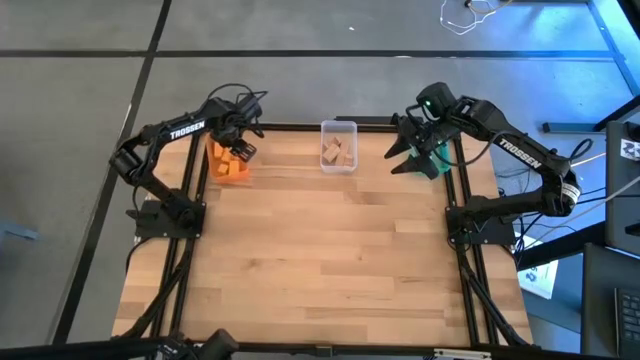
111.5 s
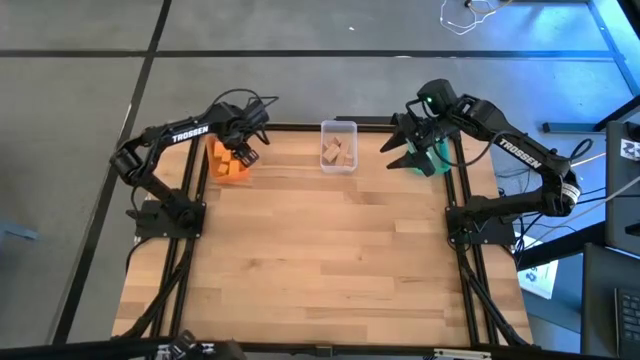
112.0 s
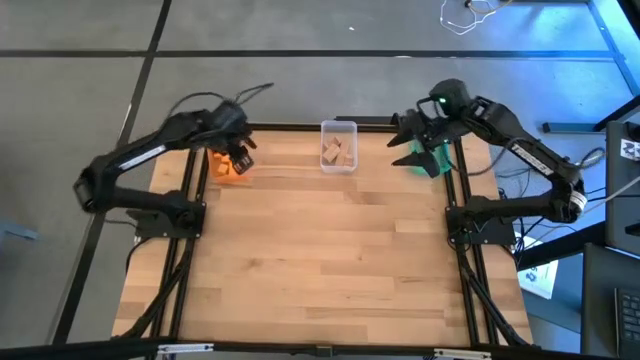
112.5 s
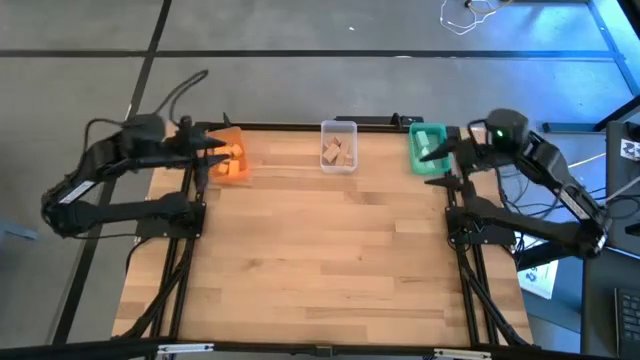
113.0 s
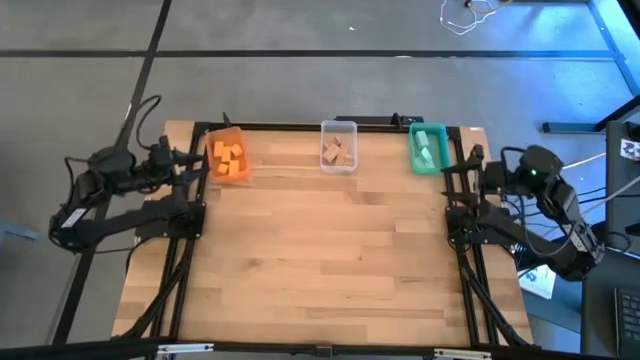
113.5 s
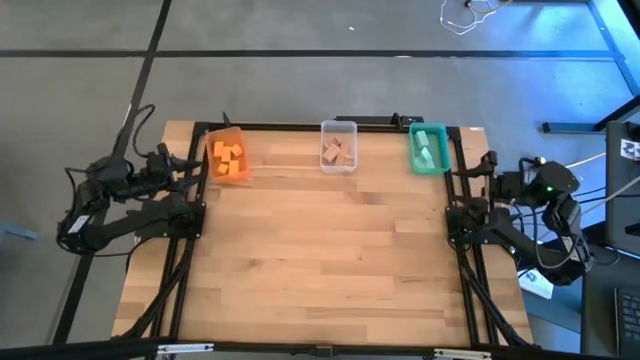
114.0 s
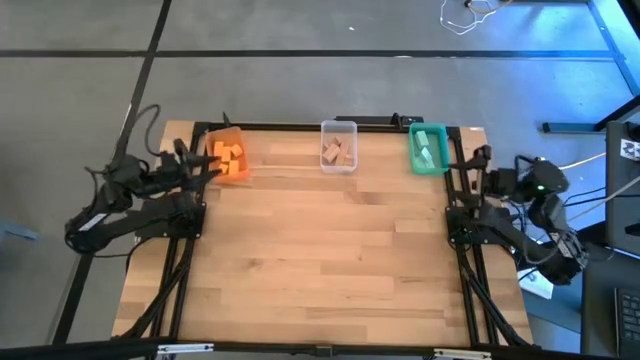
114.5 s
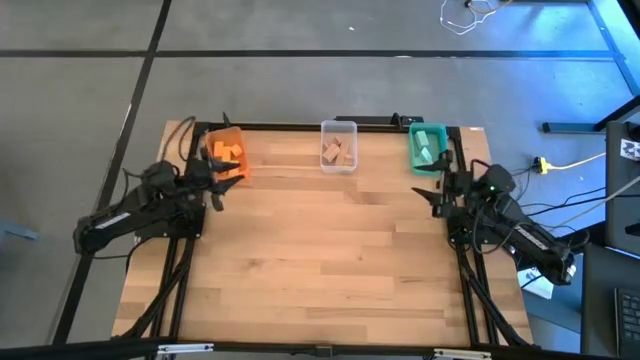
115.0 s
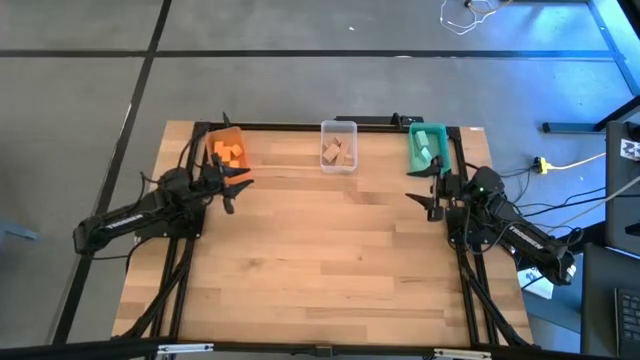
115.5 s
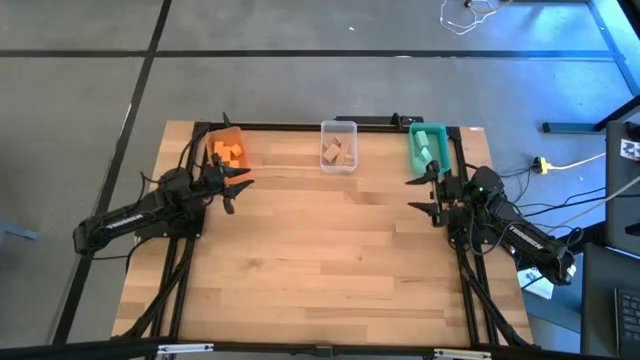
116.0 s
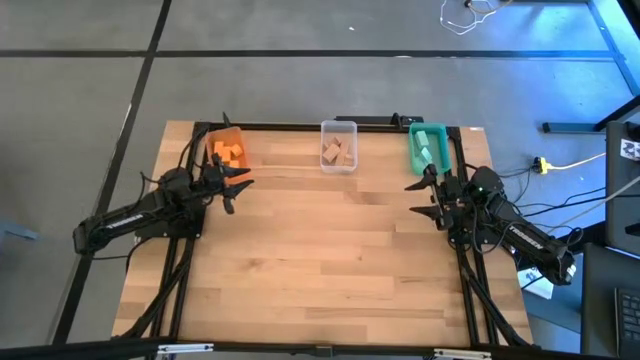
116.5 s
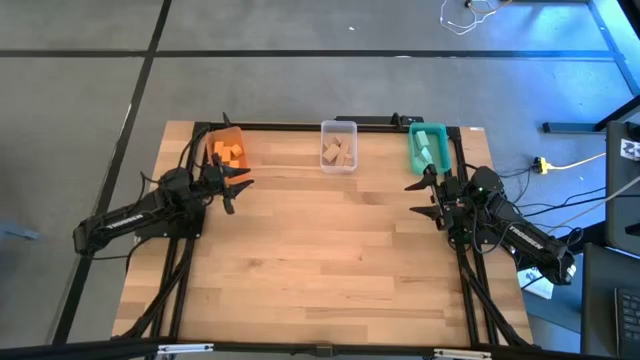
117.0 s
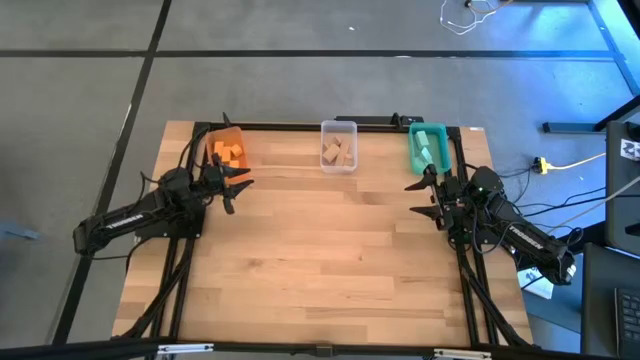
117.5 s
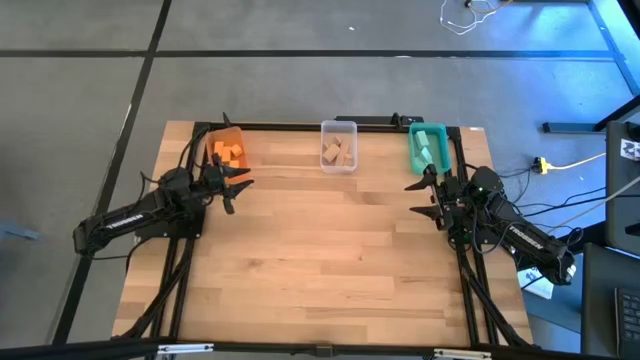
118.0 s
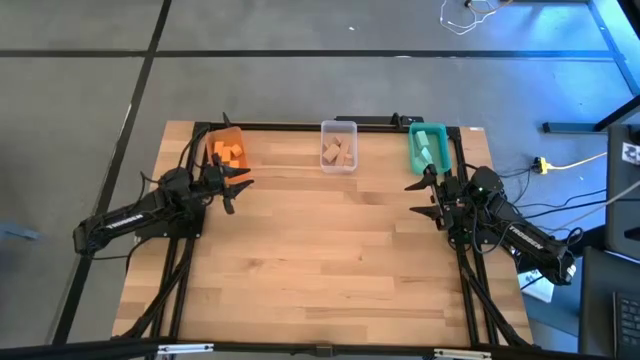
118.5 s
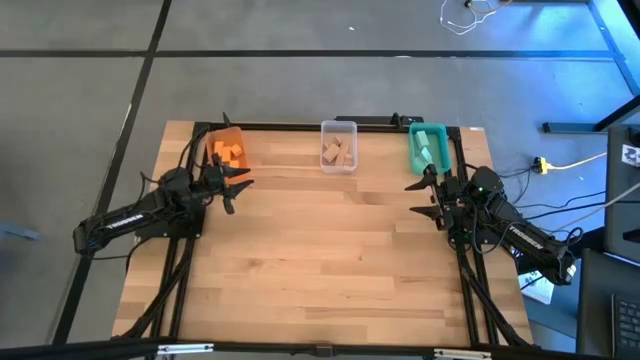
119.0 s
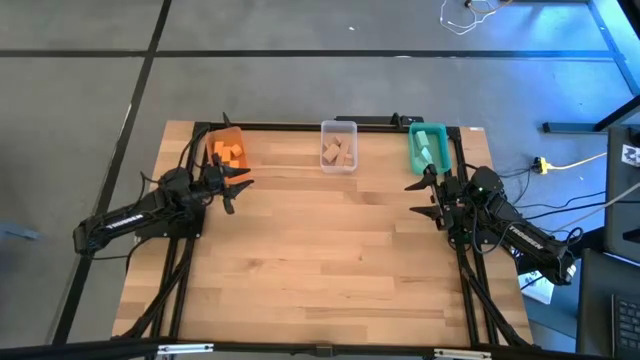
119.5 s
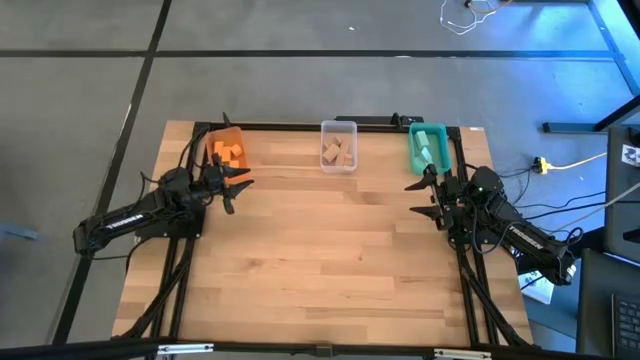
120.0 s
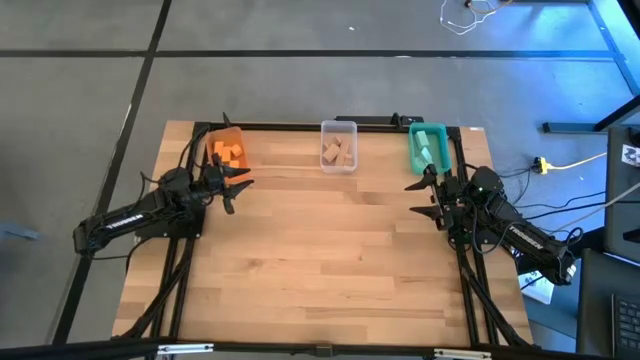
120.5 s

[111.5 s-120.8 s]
Task: Sort & place blocks by color
Return to Home Position

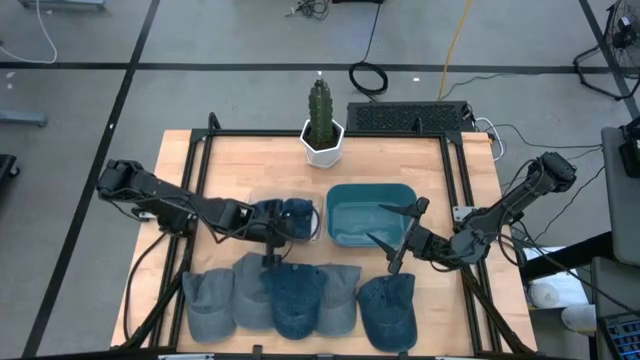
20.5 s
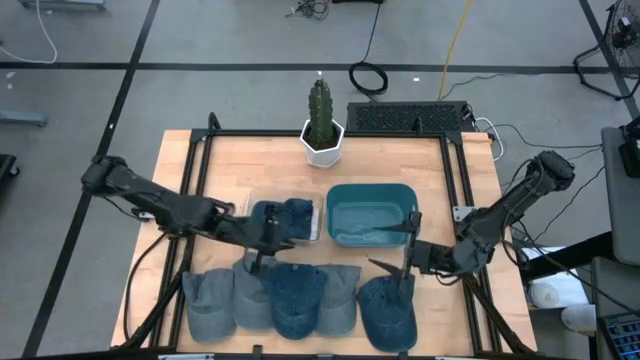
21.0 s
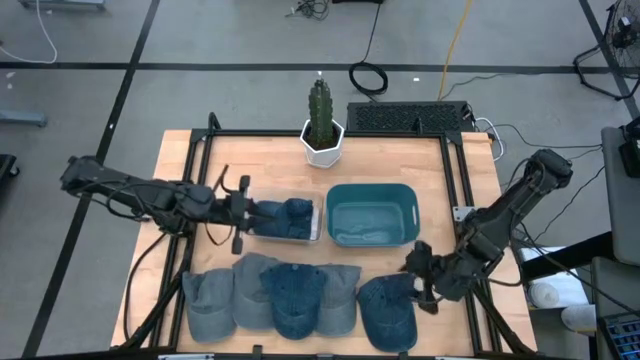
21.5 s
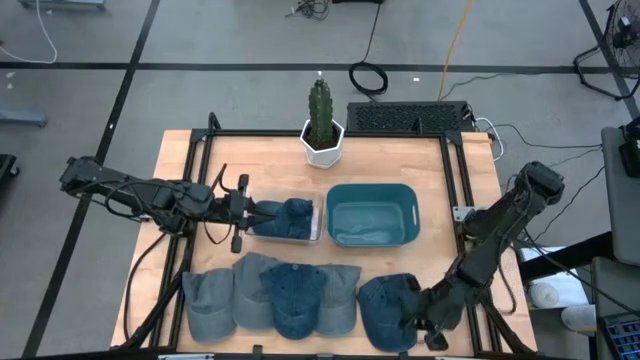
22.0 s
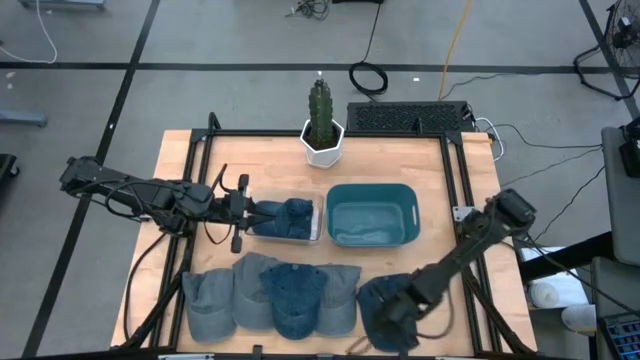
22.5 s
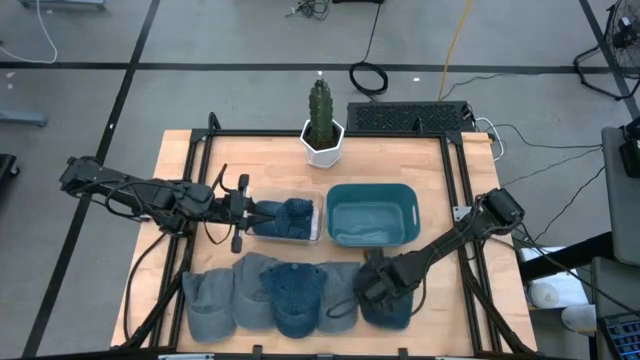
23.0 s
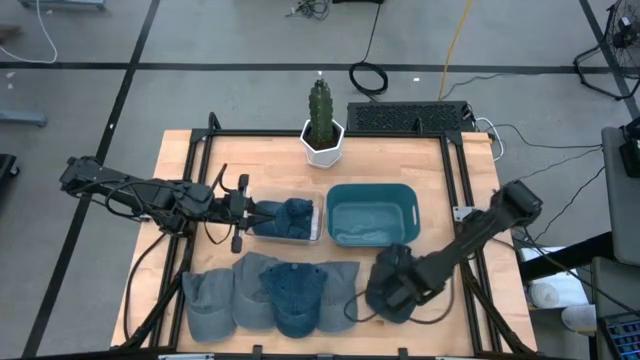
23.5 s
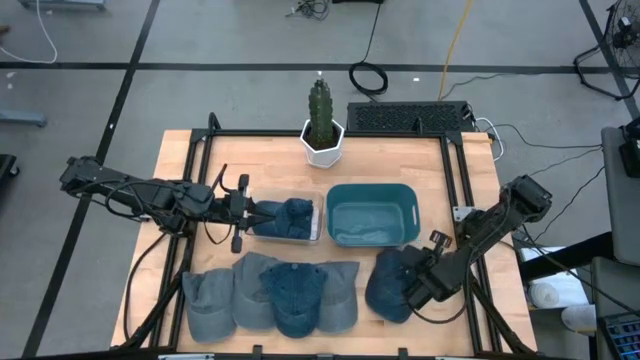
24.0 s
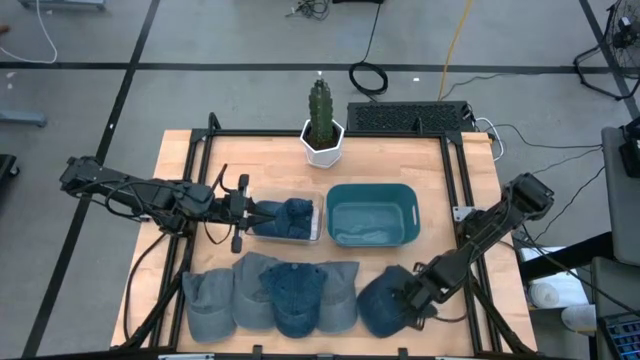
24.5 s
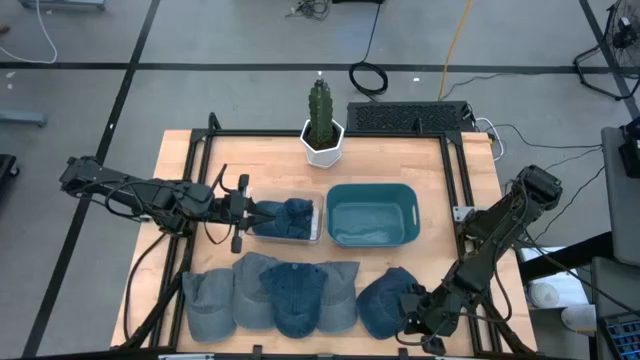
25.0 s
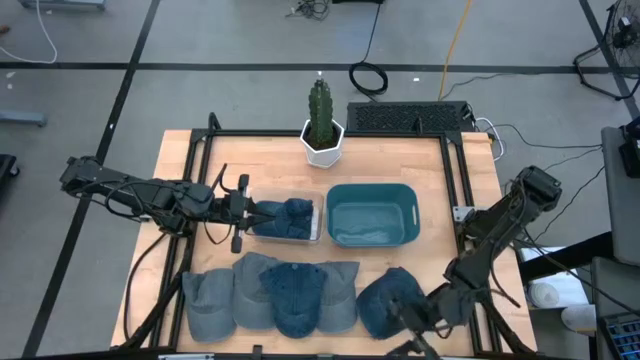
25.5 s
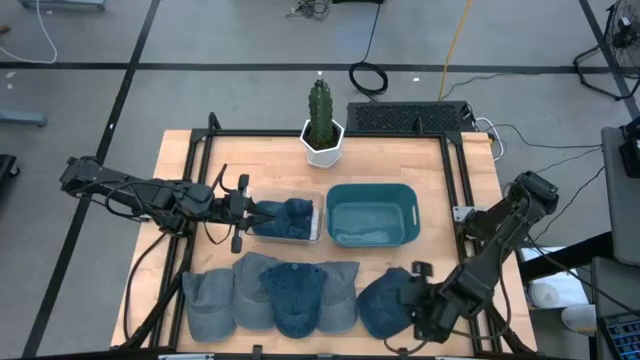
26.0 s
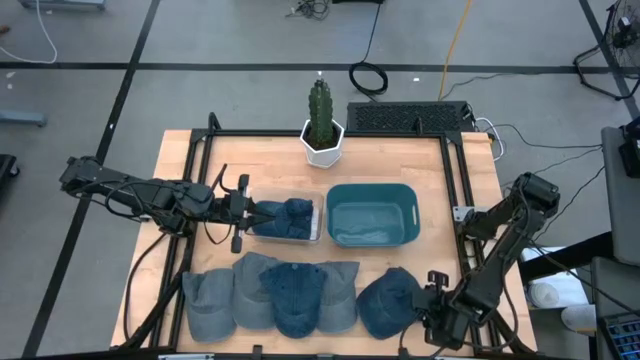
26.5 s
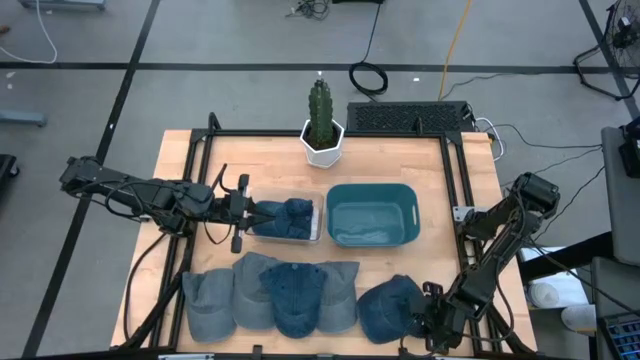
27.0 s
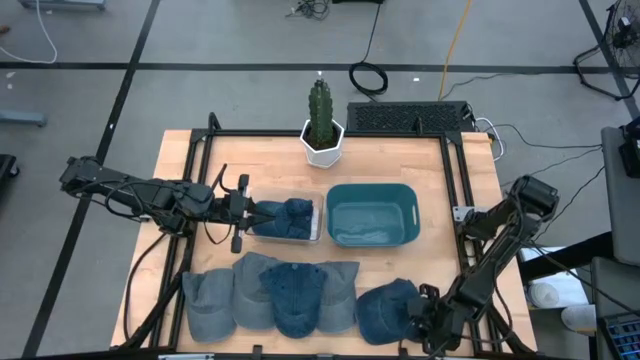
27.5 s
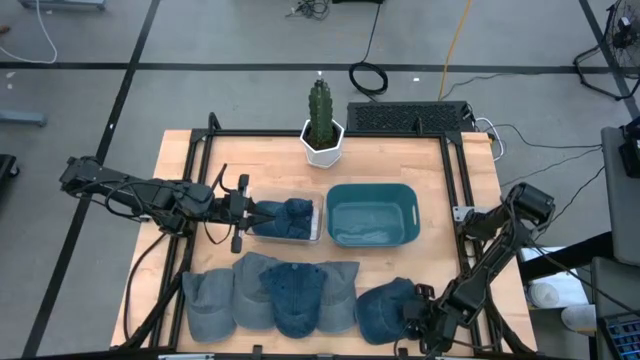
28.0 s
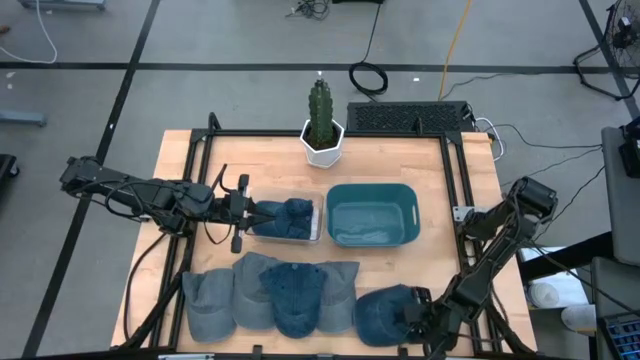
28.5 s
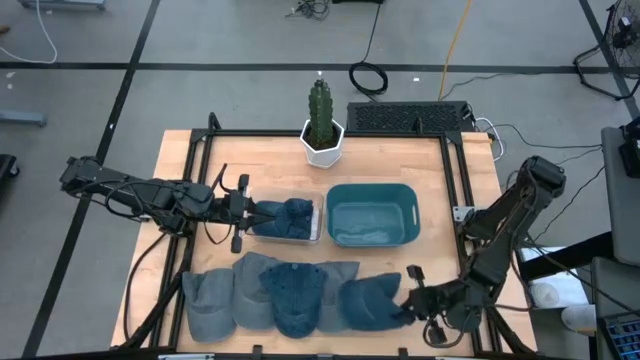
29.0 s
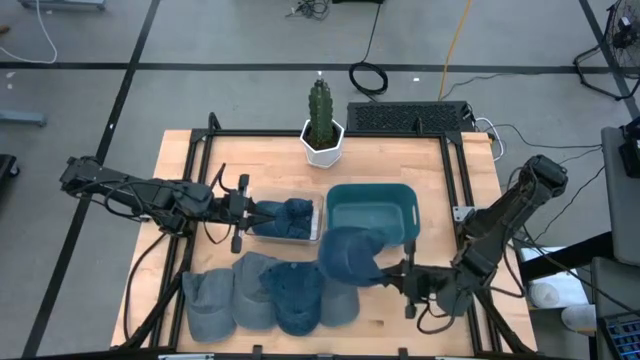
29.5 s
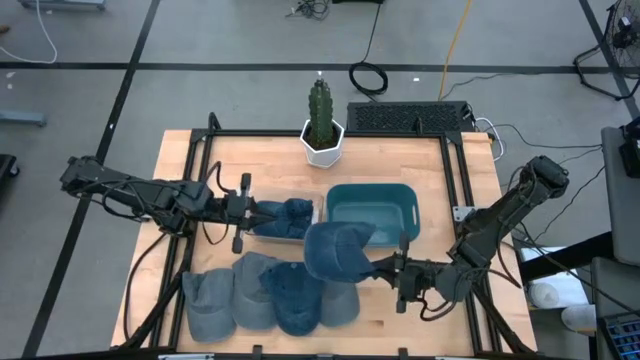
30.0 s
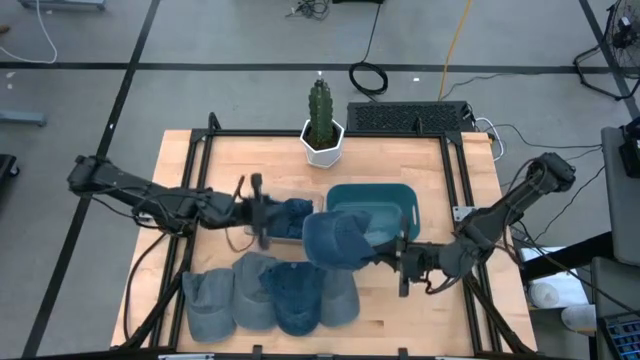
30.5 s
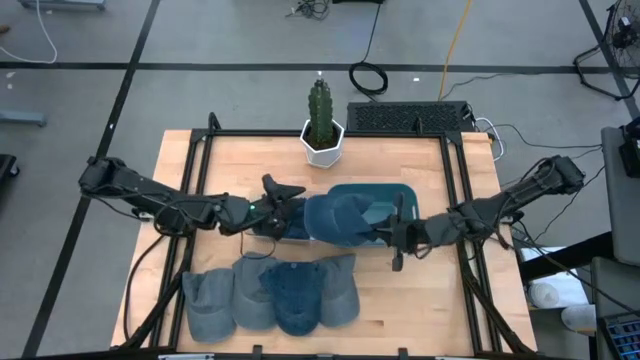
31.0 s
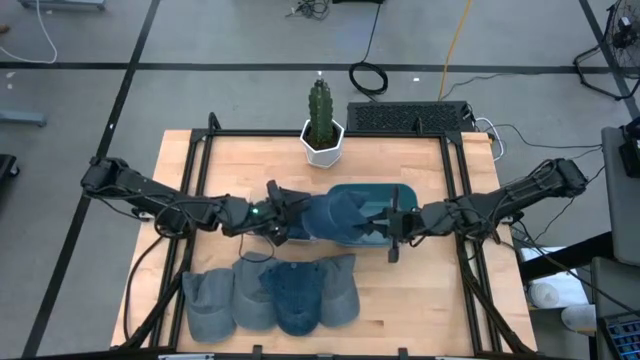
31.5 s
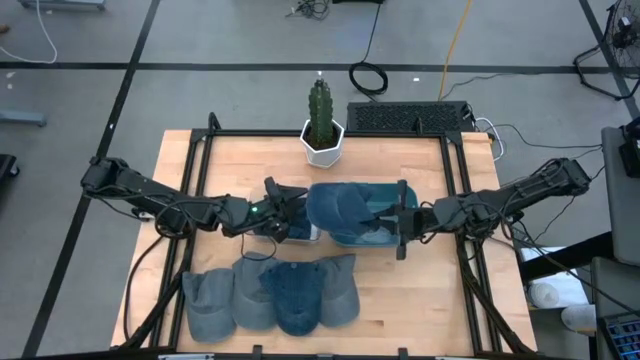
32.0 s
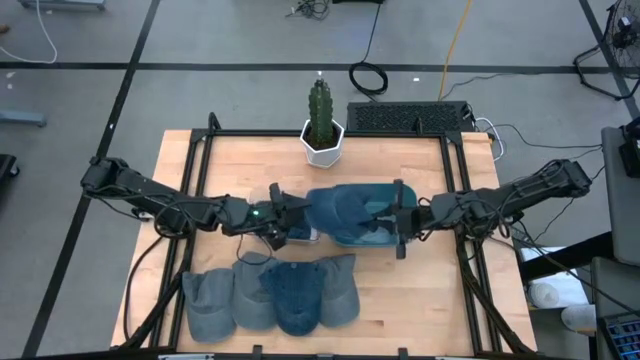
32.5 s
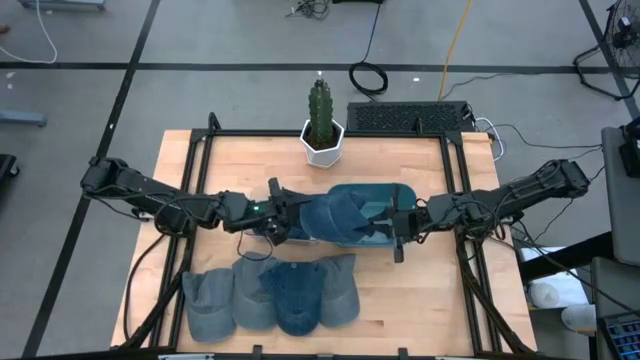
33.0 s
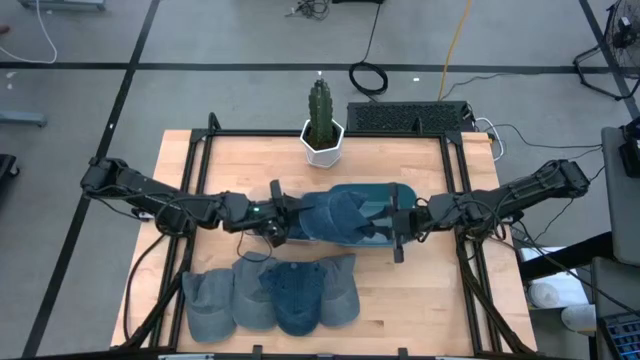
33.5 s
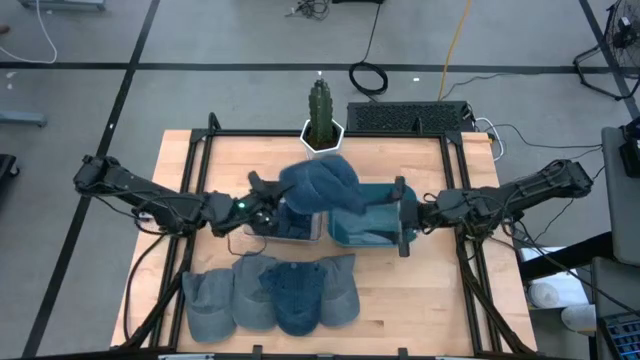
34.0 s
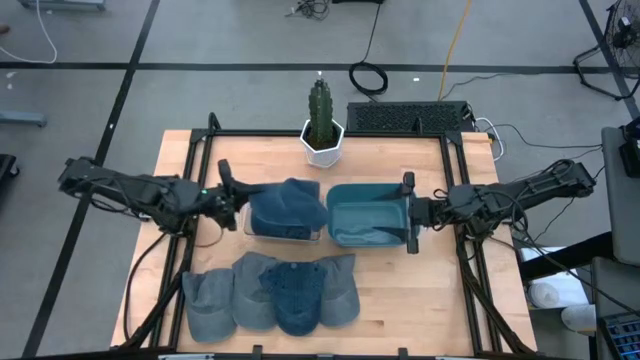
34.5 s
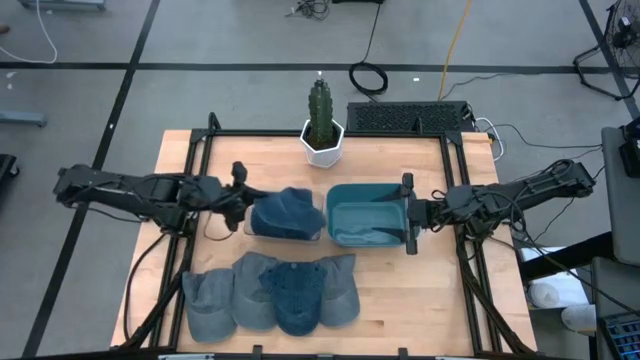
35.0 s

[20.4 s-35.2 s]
Task: Pick & Place hat
Put the right blue cap into the transparent bin
